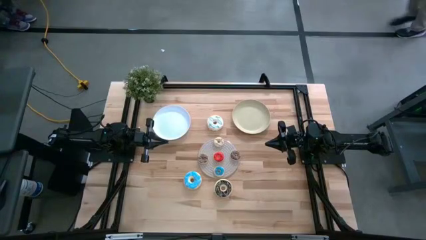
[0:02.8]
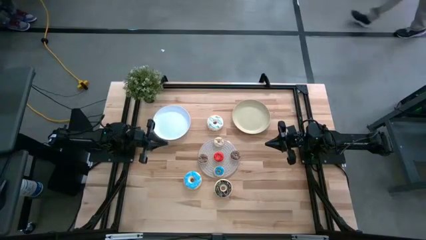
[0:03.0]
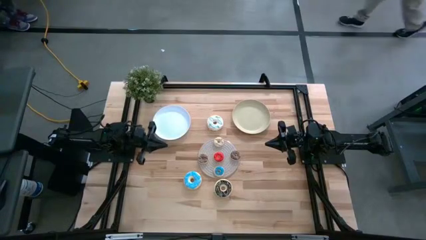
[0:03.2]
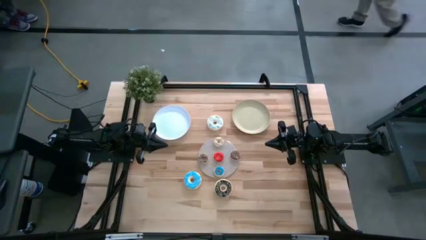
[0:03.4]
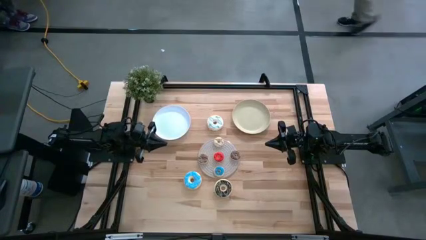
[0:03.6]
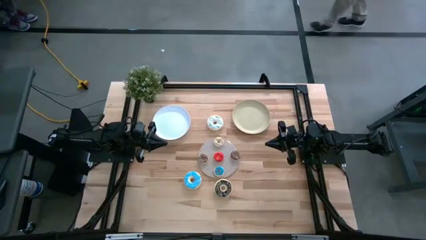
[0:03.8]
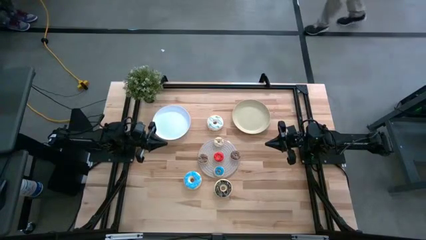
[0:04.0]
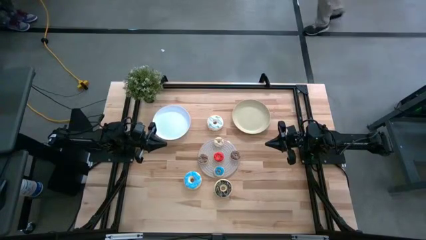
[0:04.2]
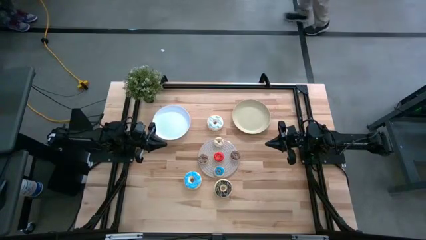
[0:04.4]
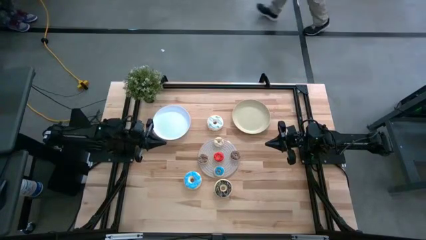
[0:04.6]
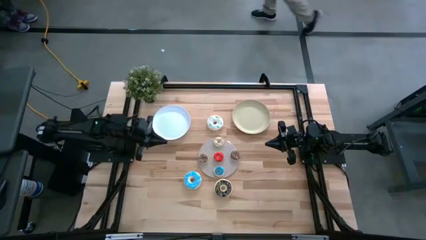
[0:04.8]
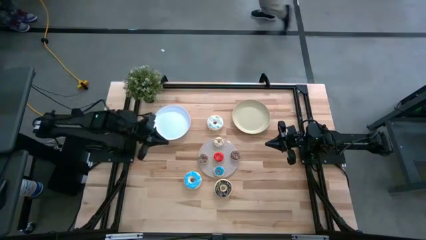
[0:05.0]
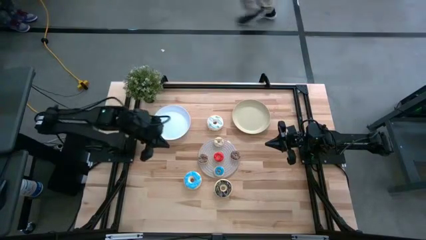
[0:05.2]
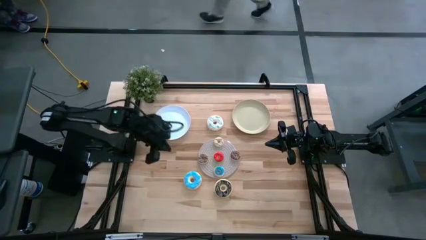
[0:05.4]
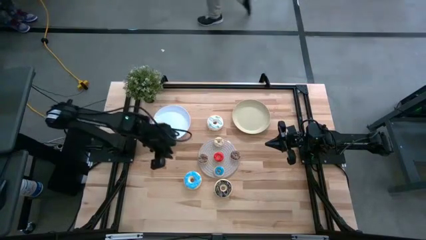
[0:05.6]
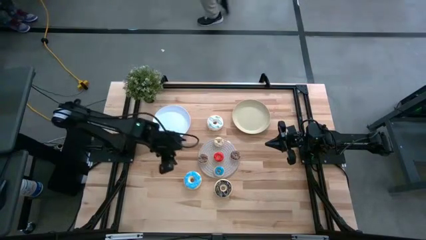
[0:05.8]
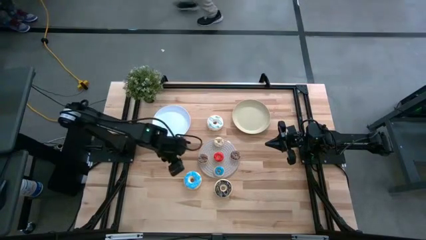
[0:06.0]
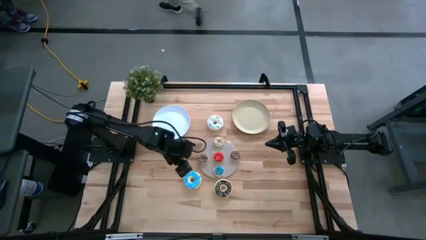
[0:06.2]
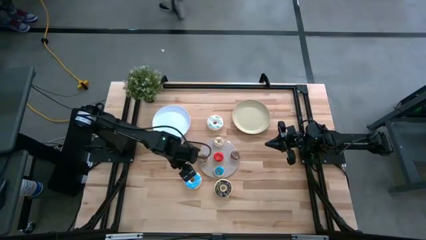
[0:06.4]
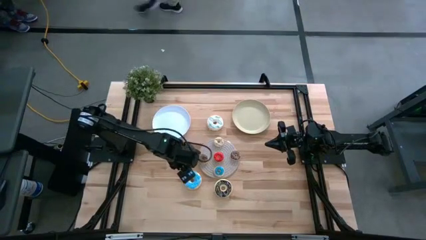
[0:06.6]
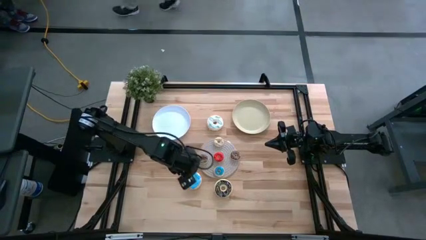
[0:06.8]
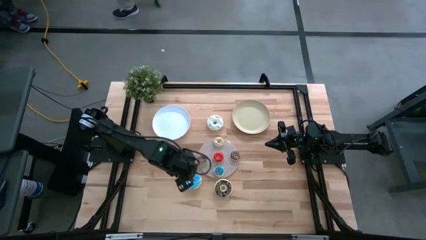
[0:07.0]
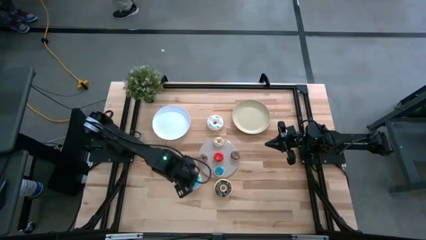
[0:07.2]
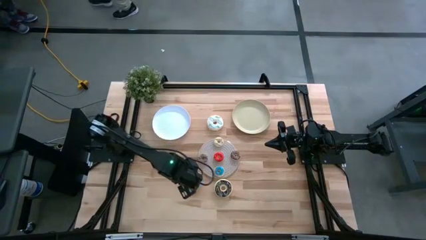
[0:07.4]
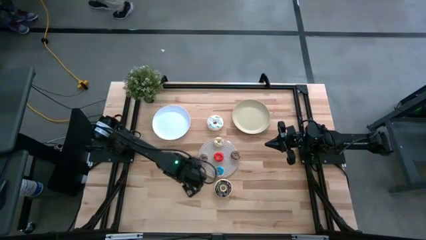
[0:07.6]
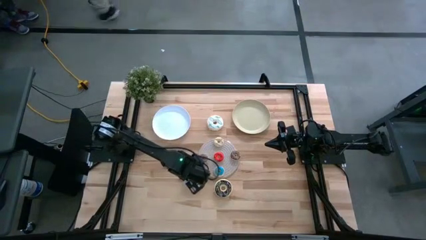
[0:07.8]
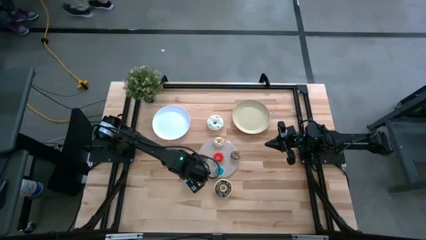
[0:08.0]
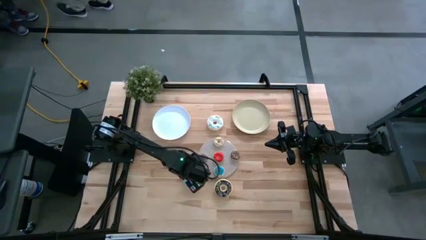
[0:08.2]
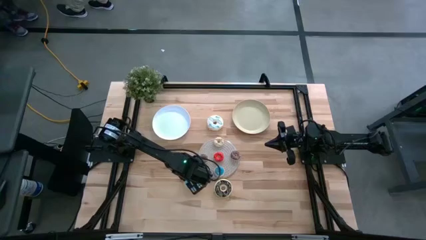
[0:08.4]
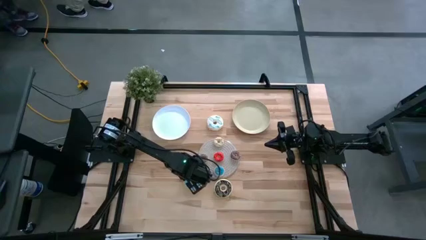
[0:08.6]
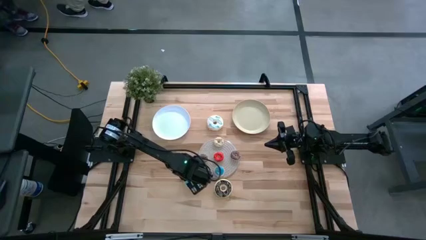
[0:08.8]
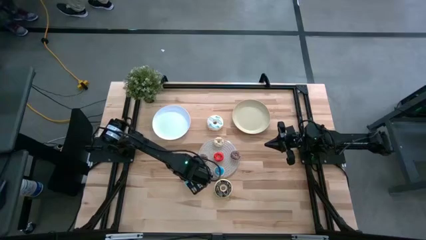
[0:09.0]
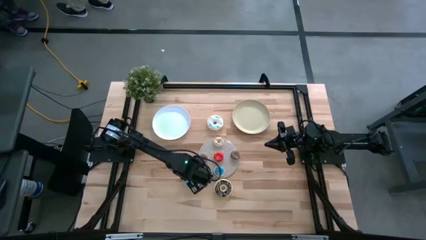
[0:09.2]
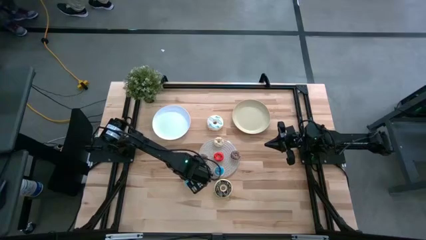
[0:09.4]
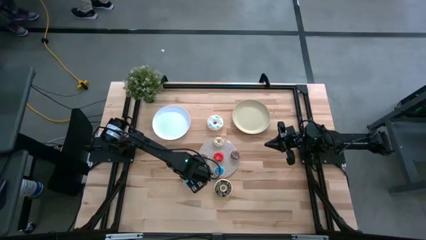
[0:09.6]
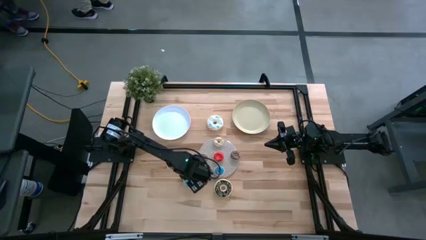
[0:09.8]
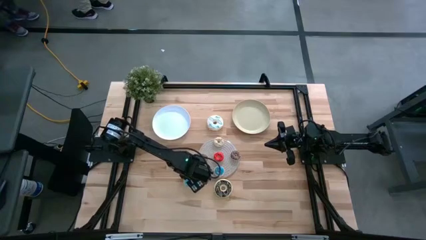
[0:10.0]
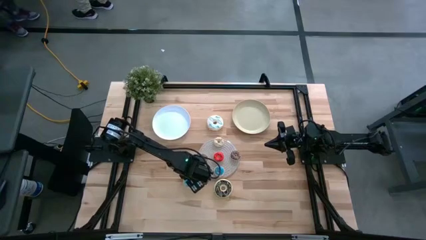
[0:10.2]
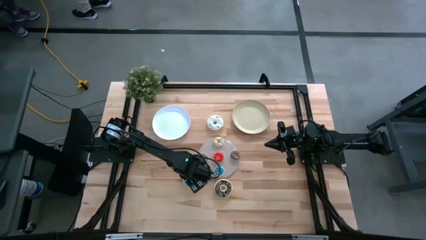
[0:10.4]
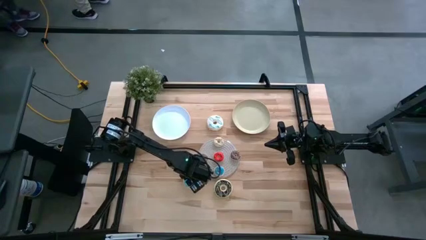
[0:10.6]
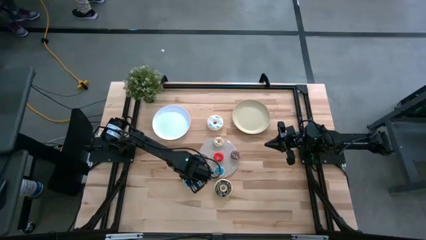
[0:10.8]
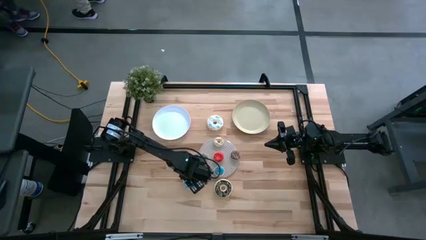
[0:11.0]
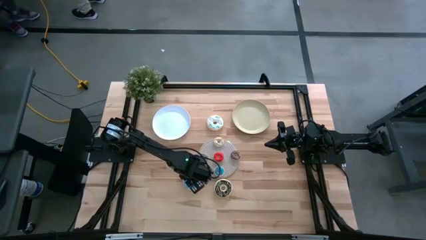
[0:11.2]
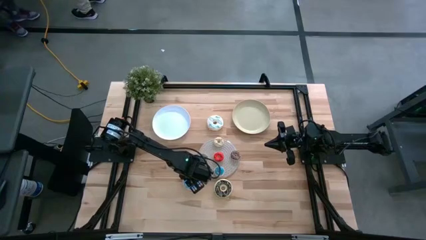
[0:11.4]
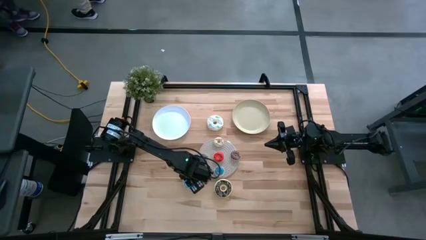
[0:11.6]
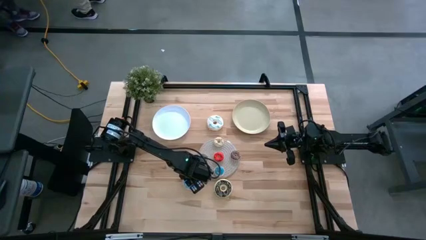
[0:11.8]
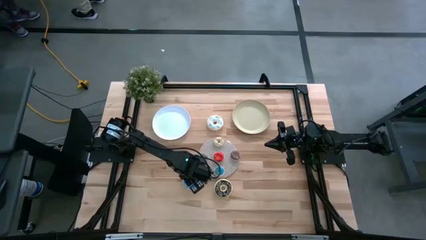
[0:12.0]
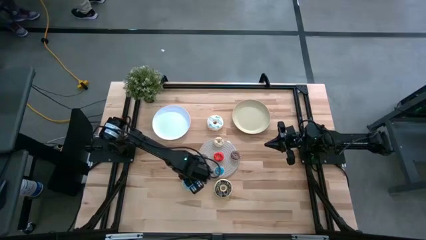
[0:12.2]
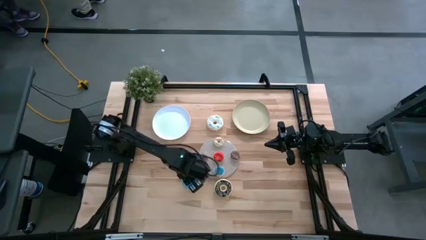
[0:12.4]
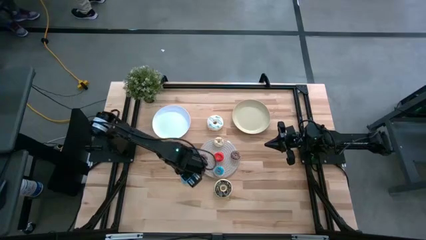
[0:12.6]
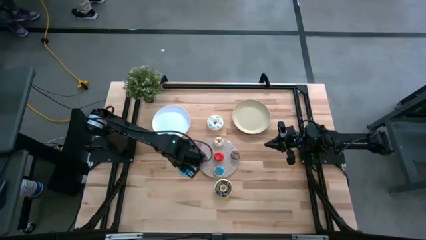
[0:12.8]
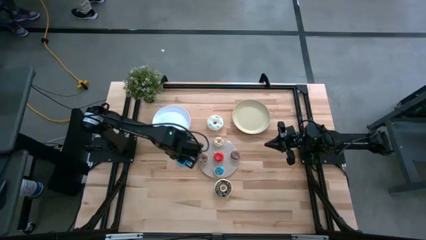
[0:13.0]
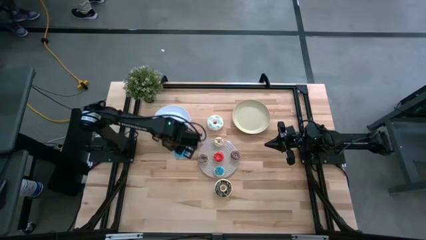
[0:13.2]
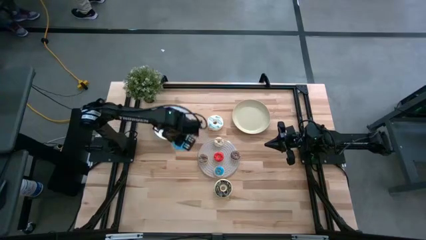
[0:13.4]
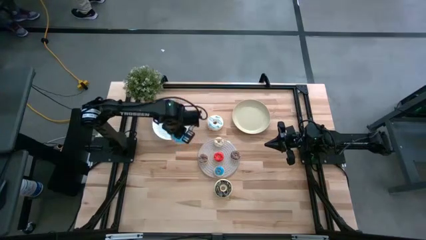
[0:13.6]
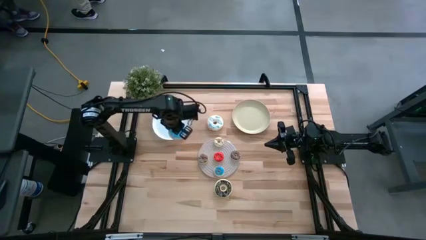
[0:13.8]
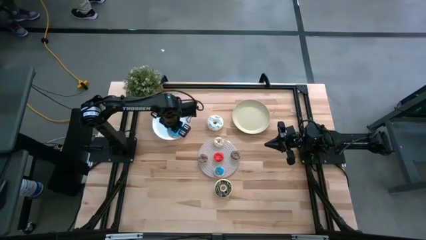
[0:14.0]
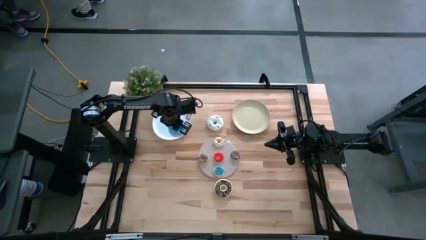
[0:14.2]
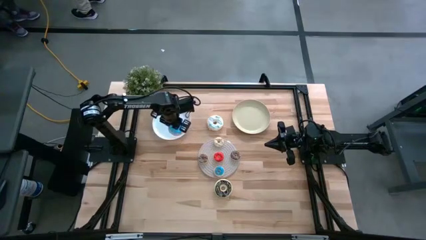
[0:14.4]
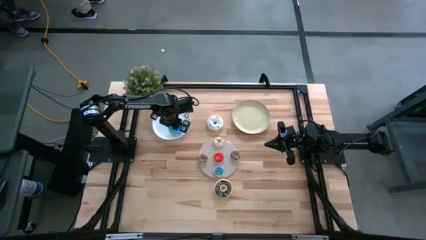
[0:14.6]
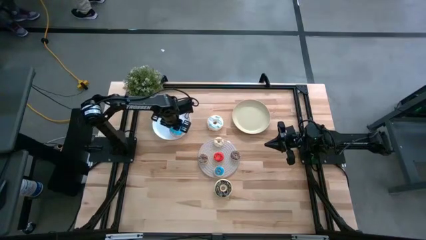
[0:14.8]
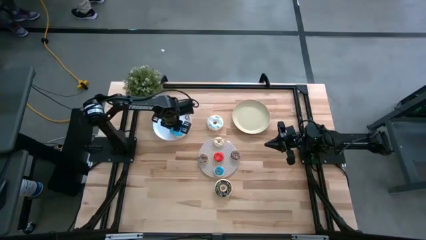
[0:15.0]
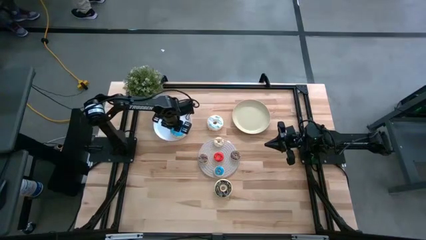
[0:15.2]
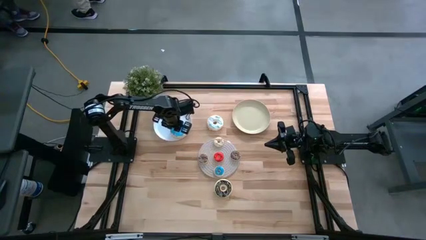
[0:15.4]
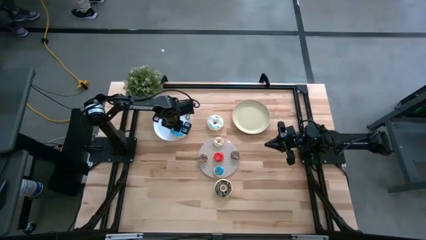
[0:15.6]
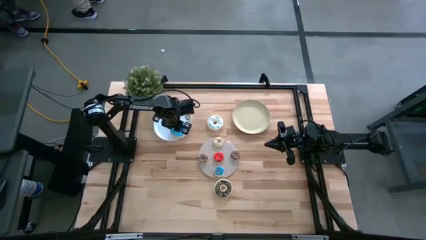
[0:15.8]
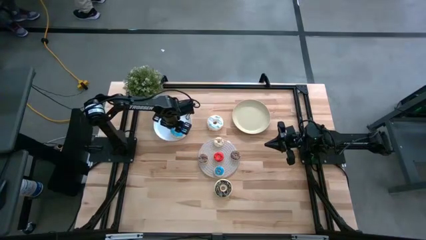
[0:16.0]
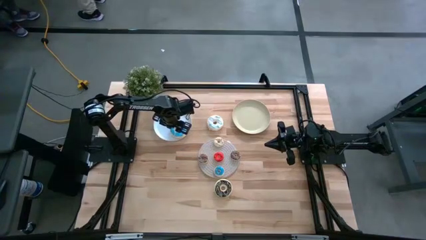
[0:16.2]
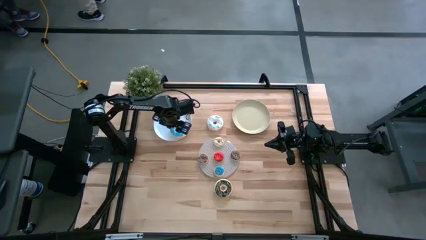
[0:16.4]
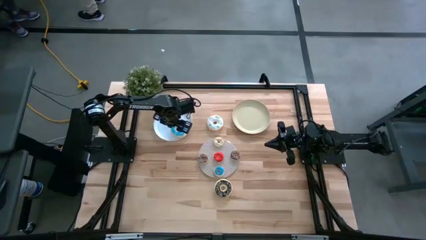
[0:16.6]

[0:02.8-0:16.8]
Task: Pick & Place donuts
Put the big light blue donut on the white plate
